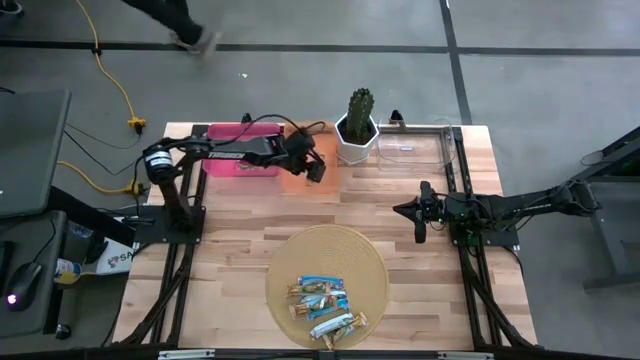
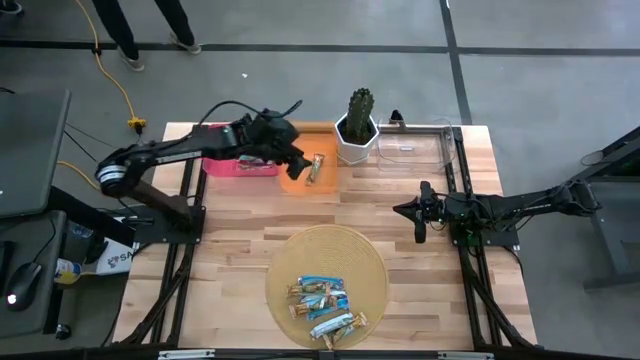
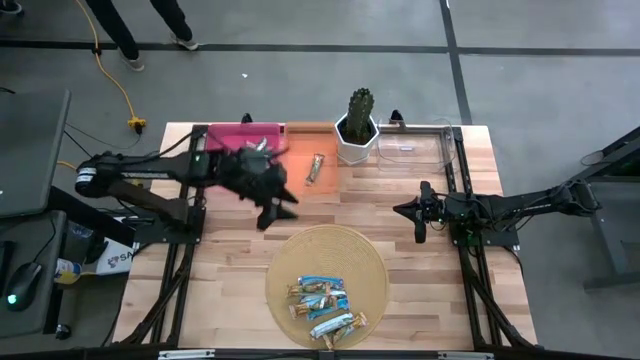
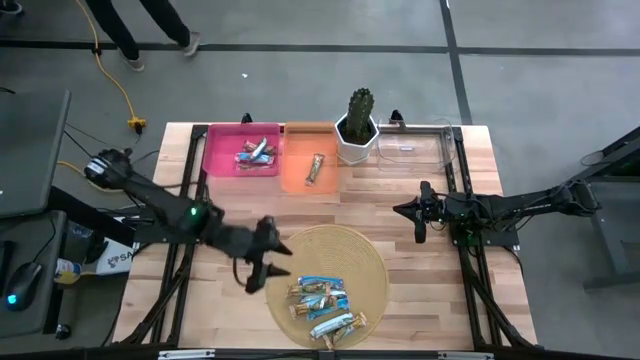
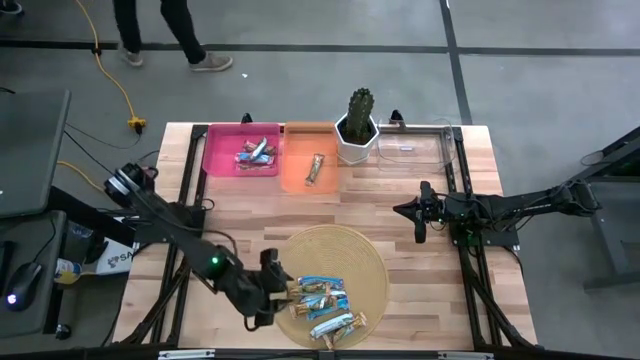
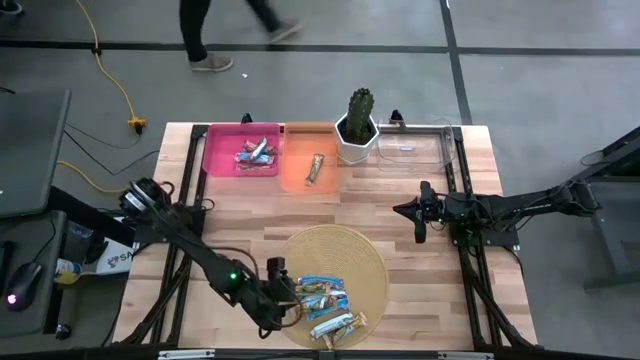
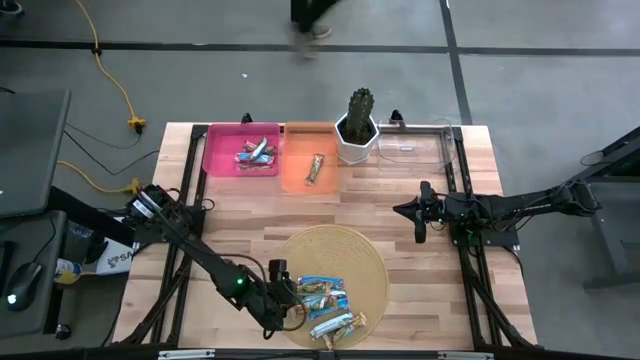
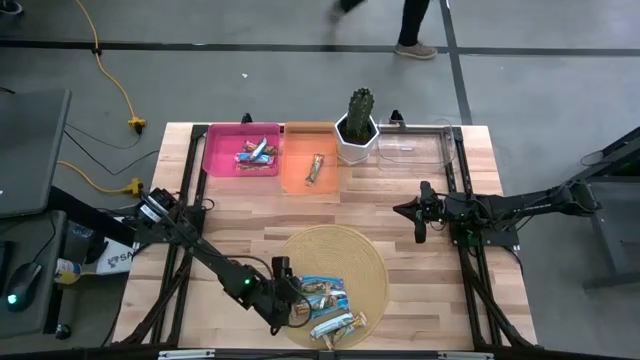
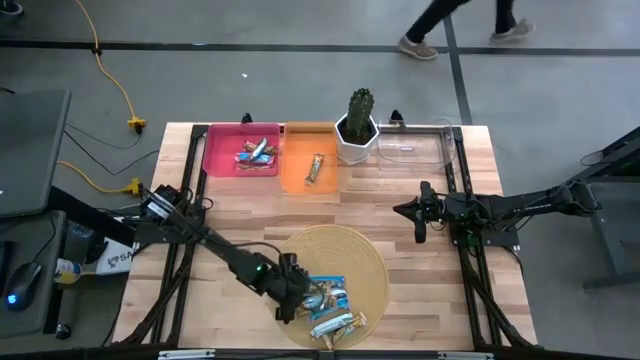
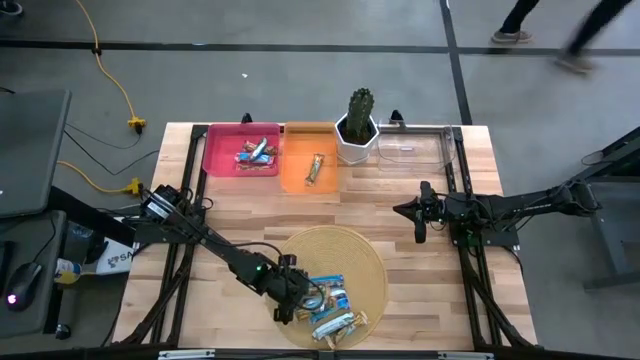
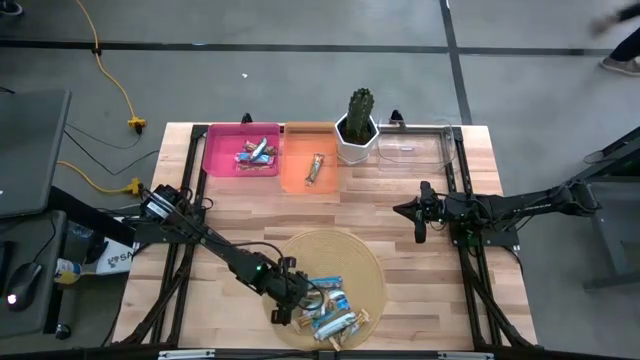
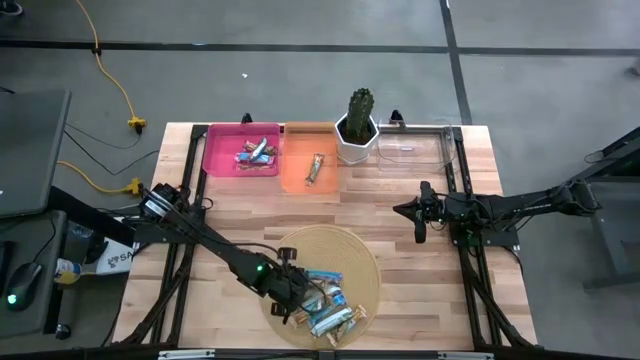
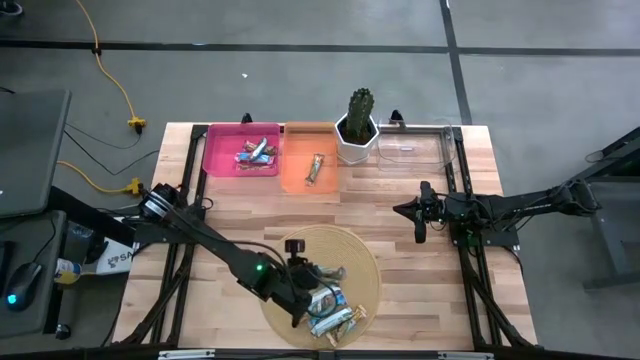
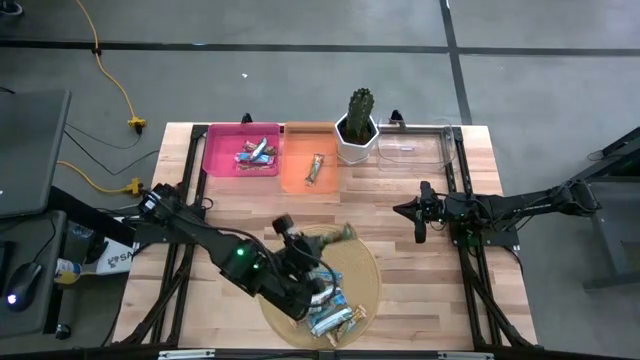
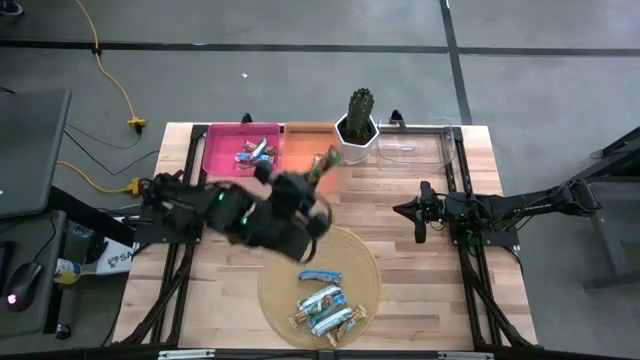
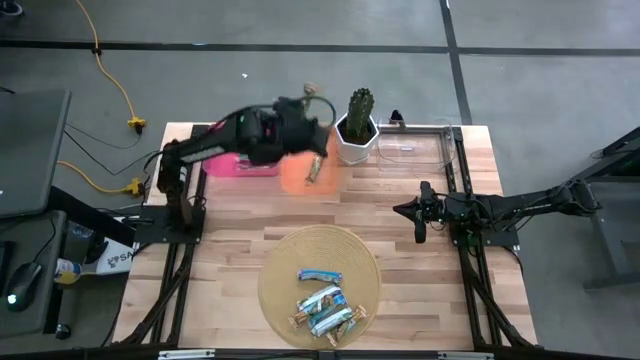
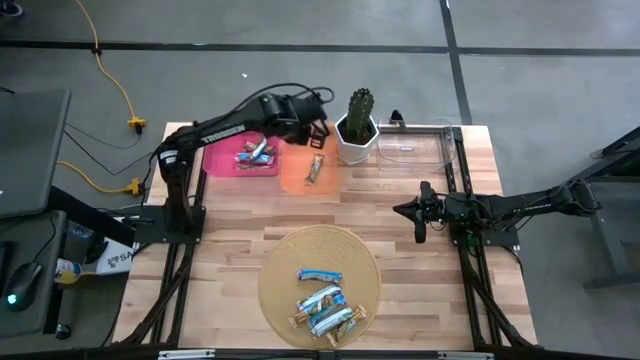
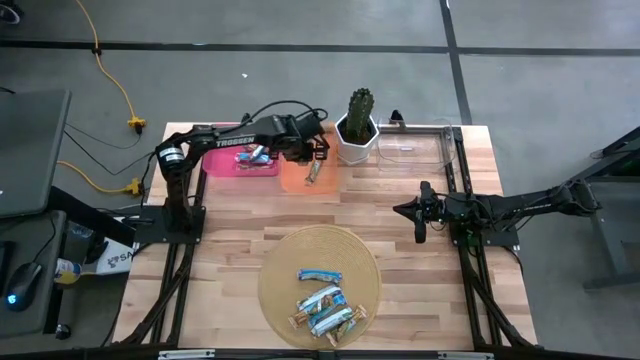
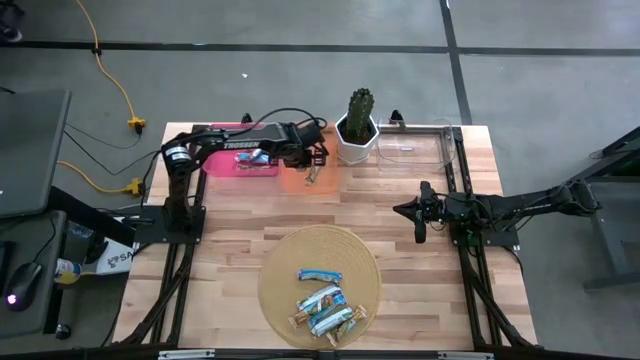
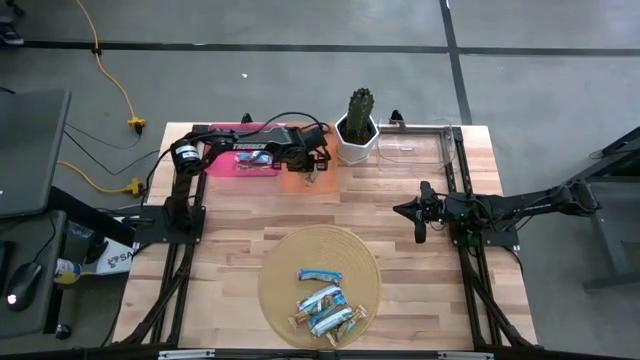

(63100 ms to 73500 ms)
Task: Pick and place Granola Bars by type
Put the yellow granola bar into the orange bin

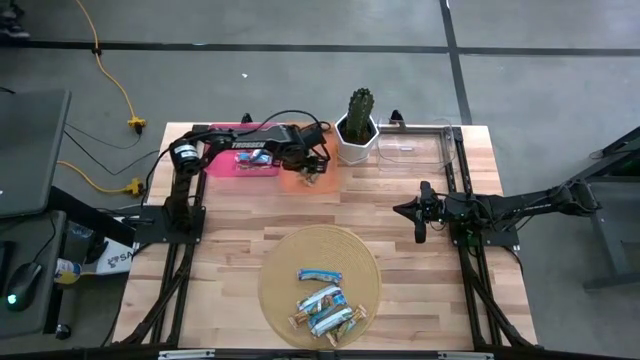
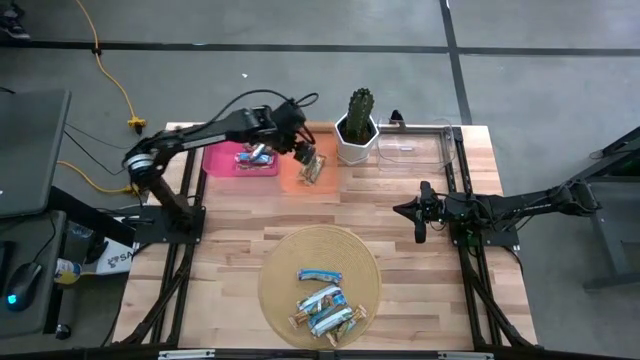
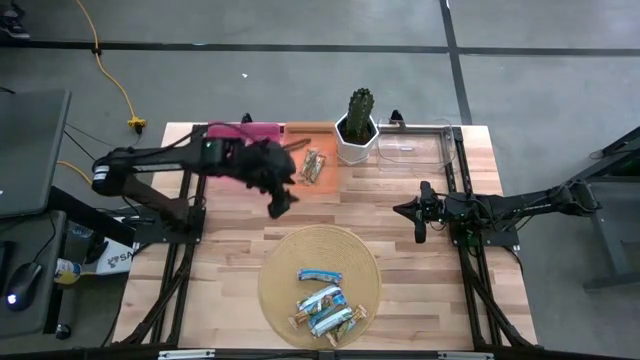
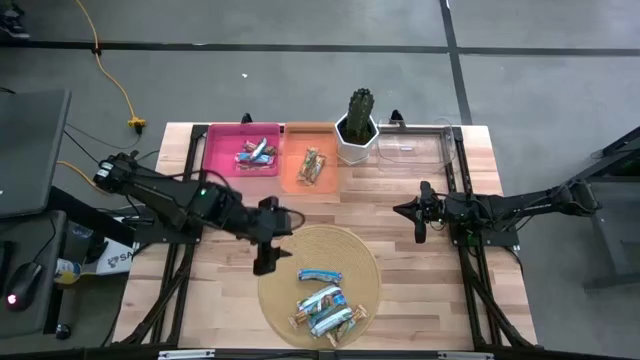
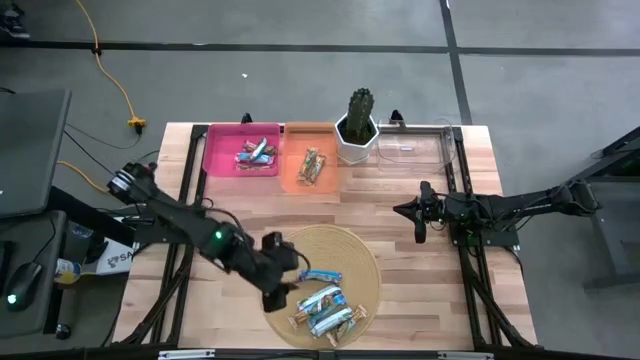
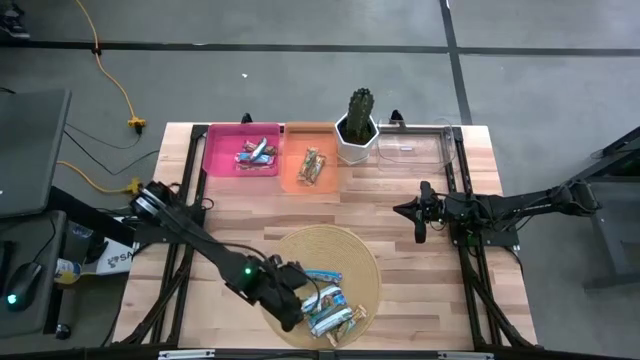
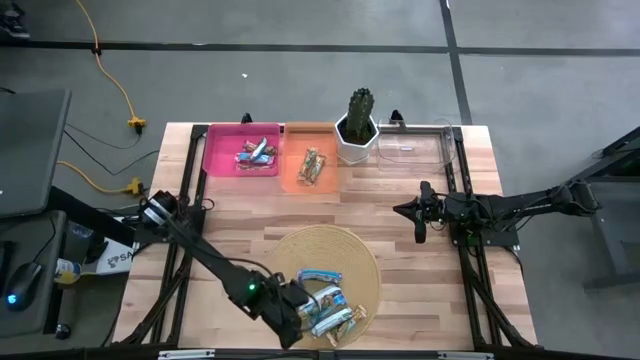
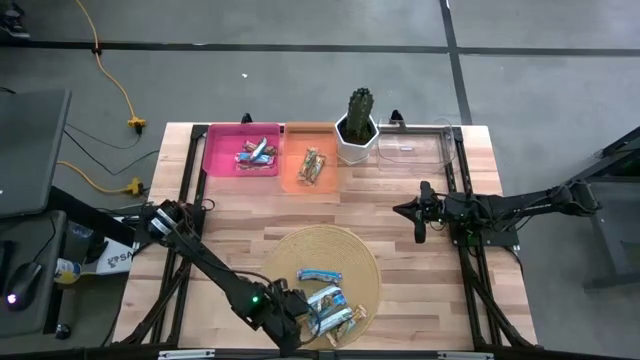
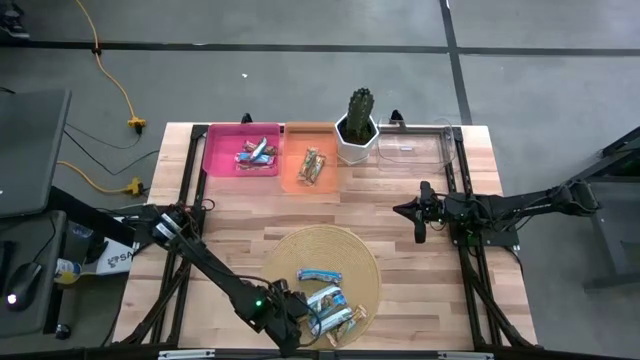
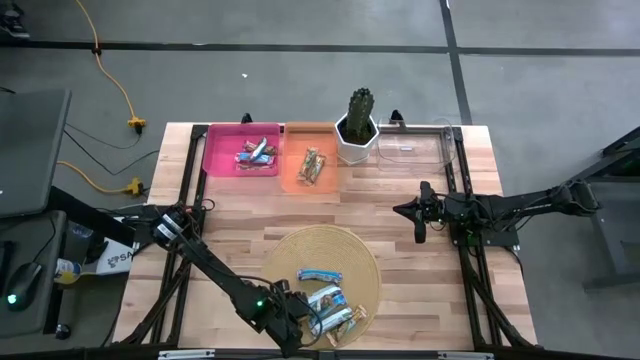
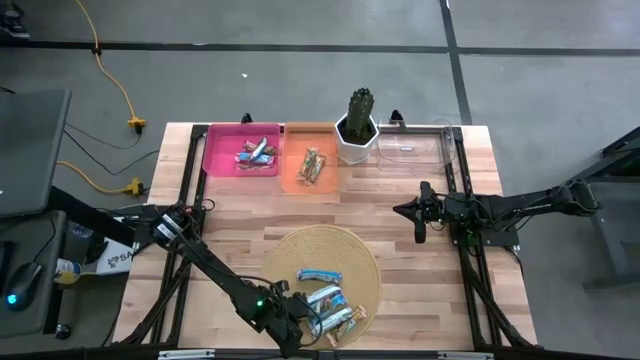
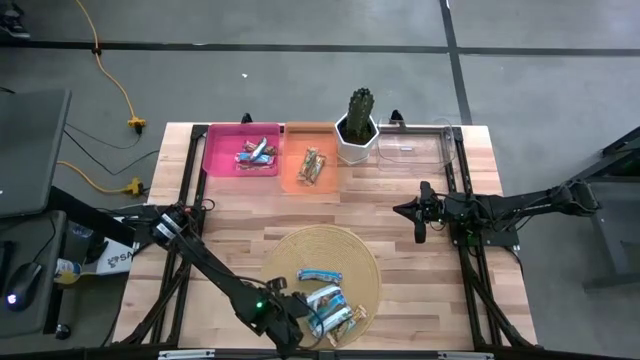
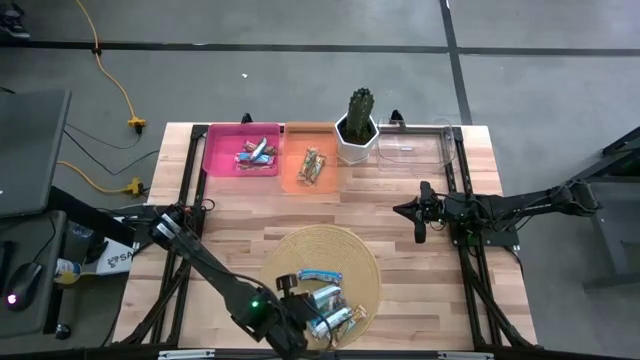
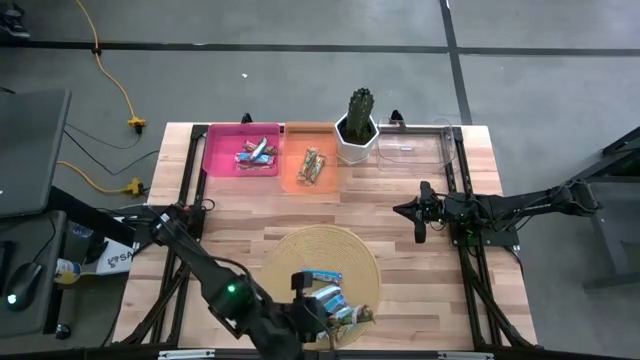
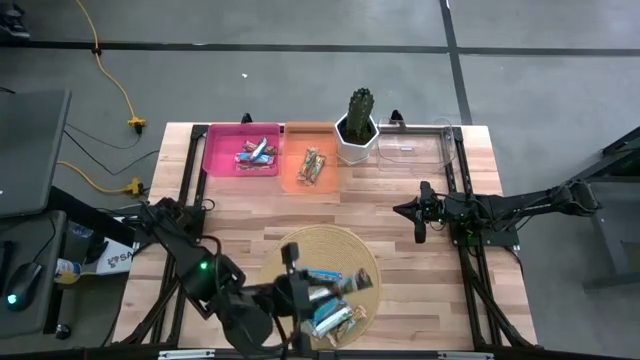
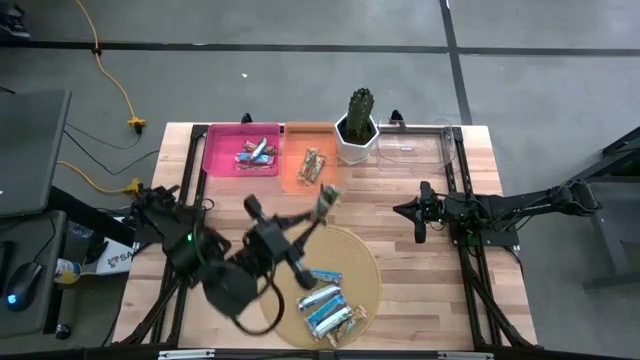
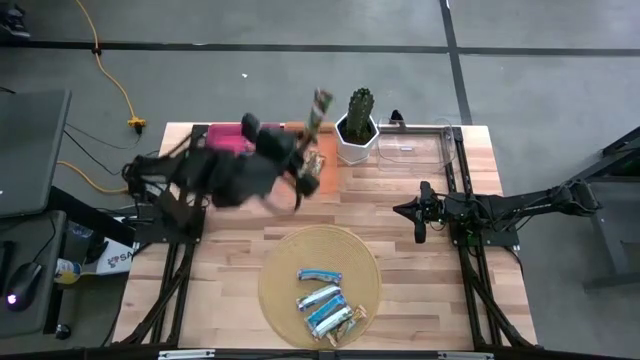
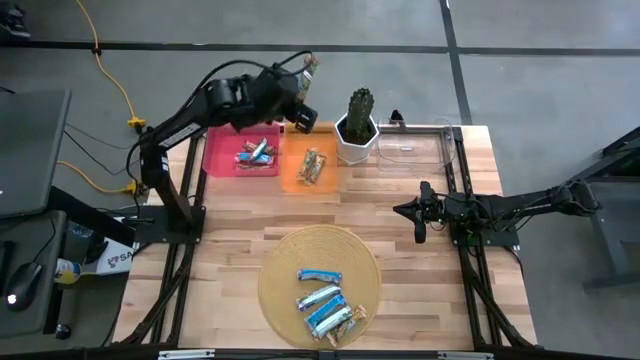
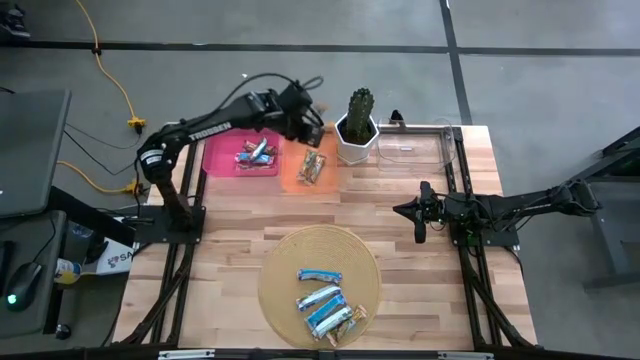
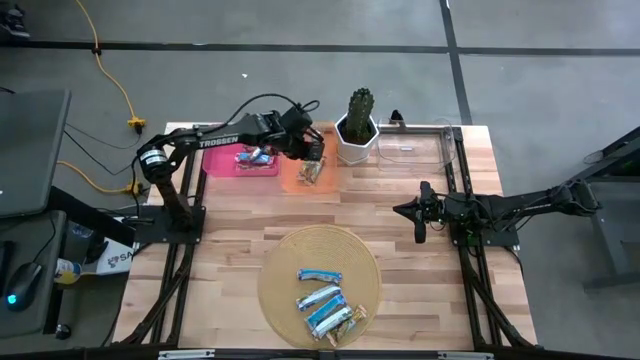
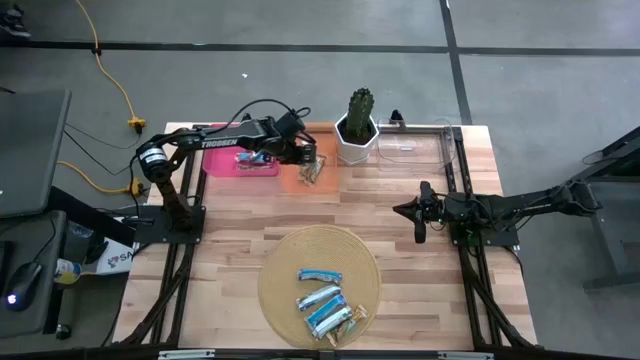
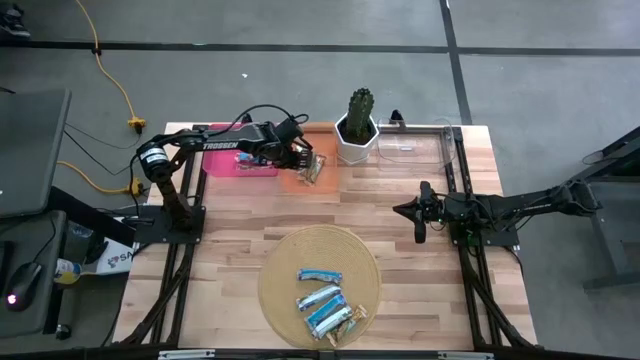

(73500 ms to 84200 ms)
Put the yellow granola bar into the orange bin
